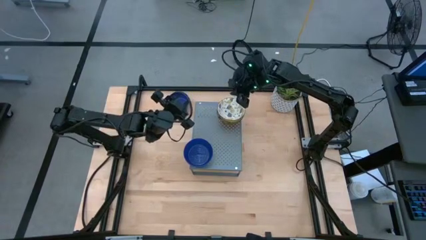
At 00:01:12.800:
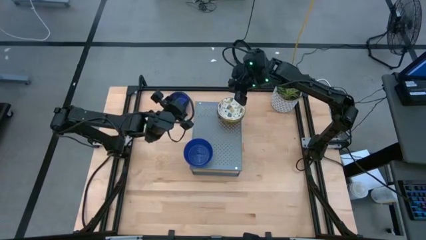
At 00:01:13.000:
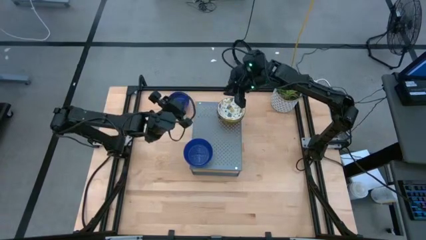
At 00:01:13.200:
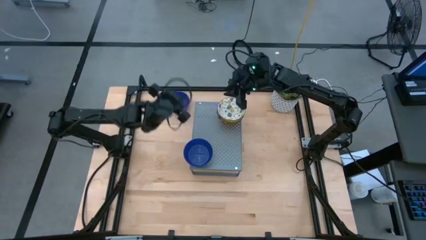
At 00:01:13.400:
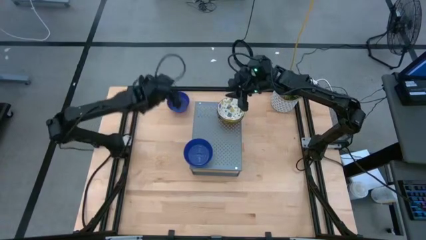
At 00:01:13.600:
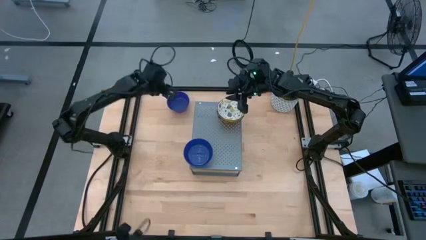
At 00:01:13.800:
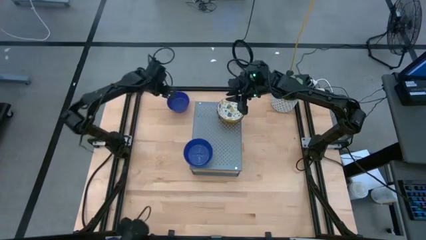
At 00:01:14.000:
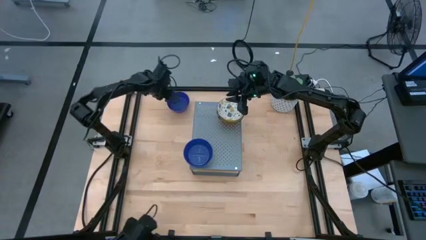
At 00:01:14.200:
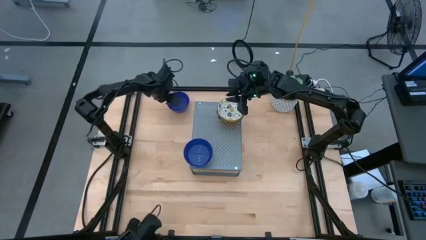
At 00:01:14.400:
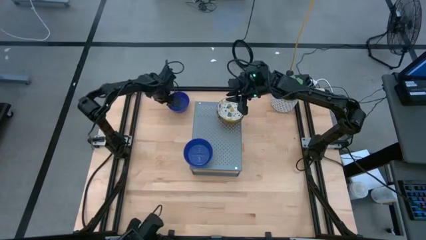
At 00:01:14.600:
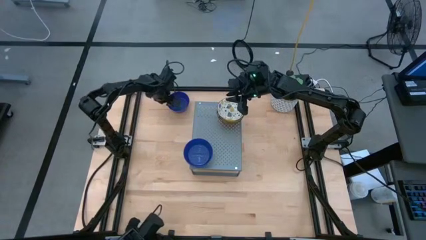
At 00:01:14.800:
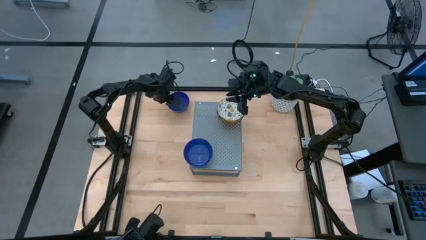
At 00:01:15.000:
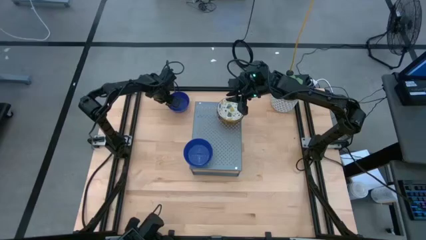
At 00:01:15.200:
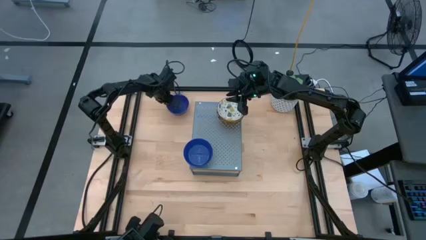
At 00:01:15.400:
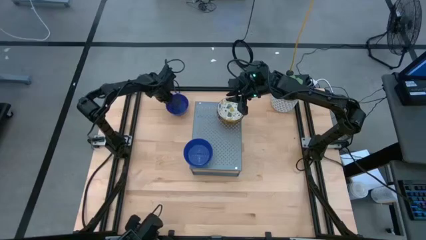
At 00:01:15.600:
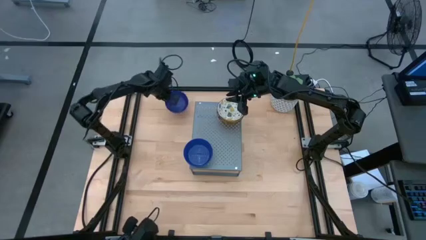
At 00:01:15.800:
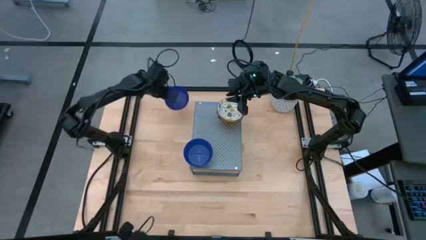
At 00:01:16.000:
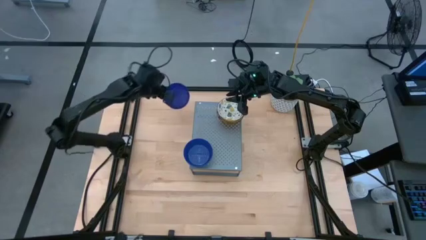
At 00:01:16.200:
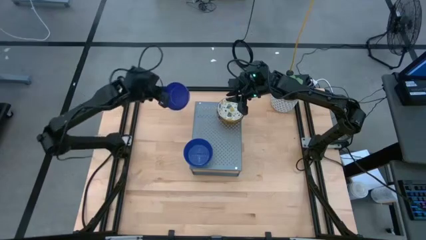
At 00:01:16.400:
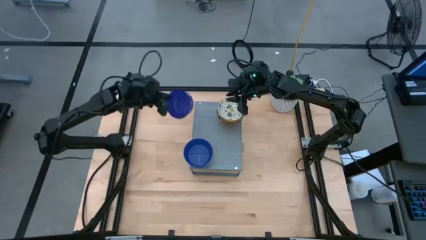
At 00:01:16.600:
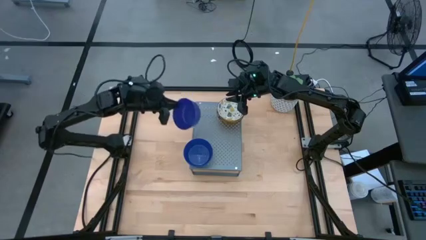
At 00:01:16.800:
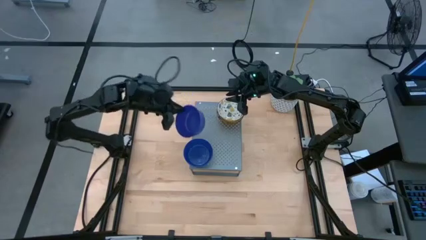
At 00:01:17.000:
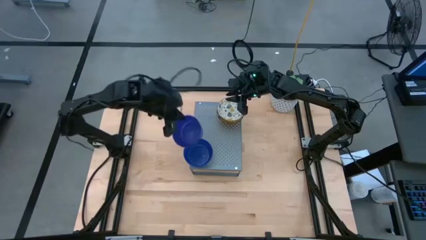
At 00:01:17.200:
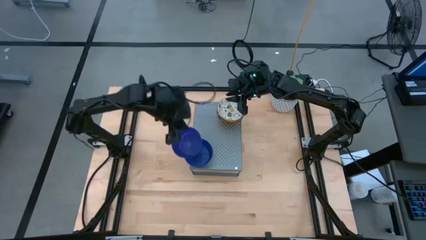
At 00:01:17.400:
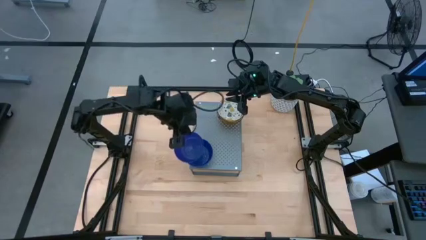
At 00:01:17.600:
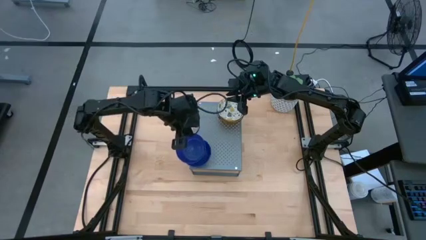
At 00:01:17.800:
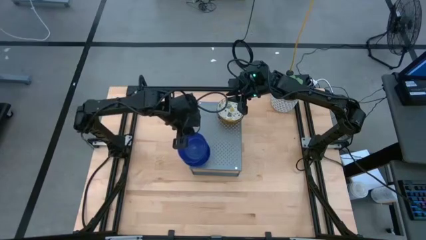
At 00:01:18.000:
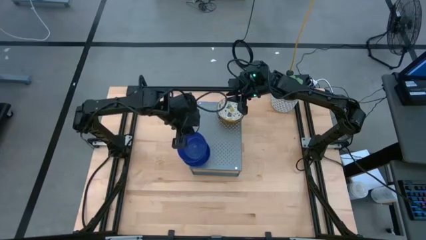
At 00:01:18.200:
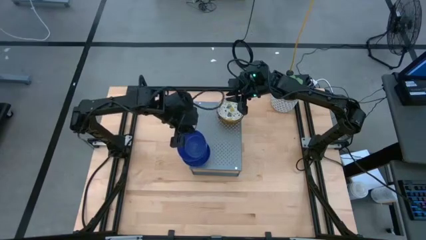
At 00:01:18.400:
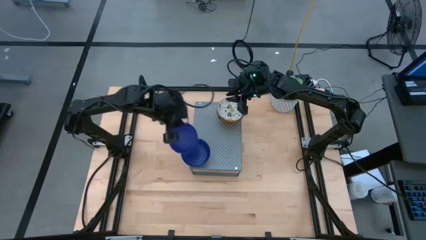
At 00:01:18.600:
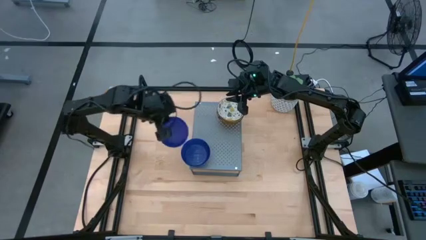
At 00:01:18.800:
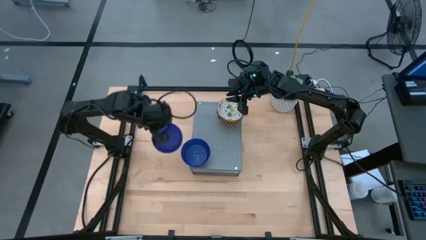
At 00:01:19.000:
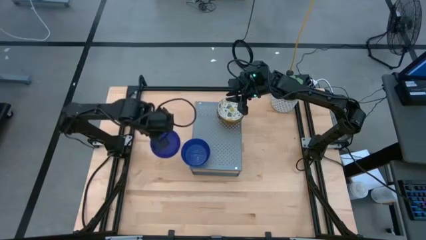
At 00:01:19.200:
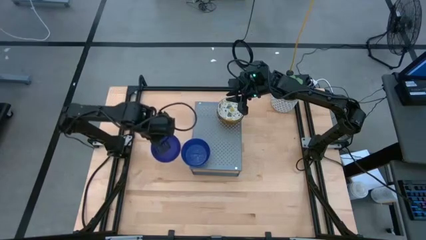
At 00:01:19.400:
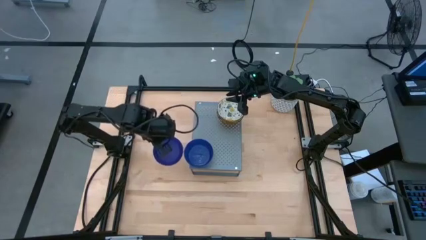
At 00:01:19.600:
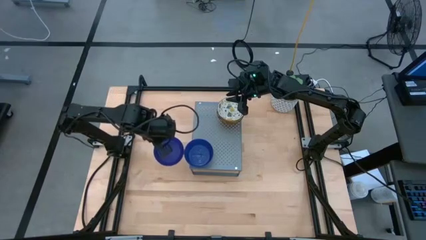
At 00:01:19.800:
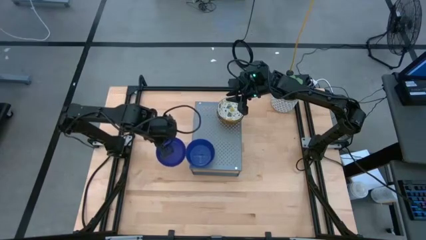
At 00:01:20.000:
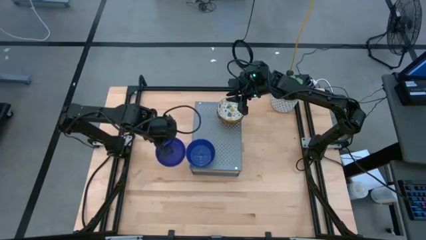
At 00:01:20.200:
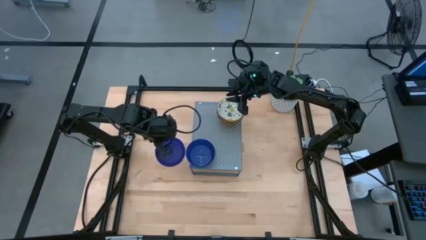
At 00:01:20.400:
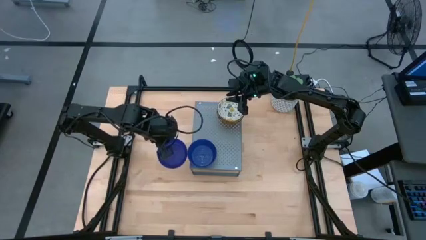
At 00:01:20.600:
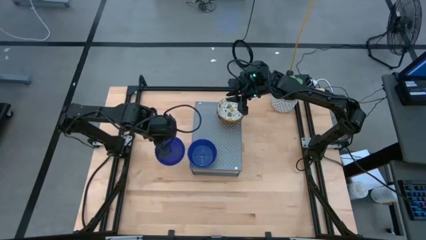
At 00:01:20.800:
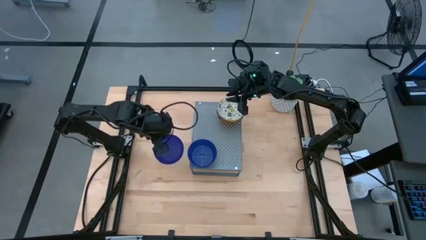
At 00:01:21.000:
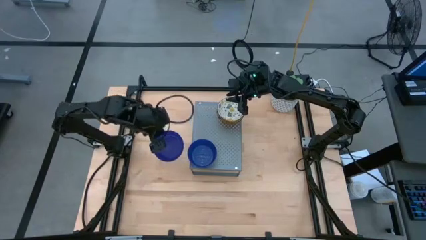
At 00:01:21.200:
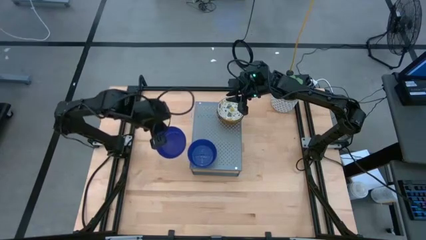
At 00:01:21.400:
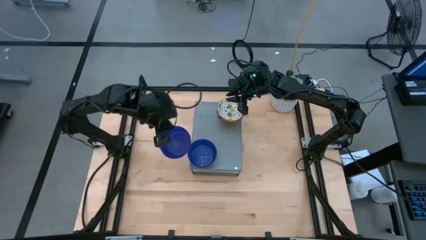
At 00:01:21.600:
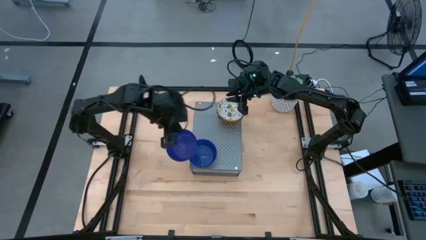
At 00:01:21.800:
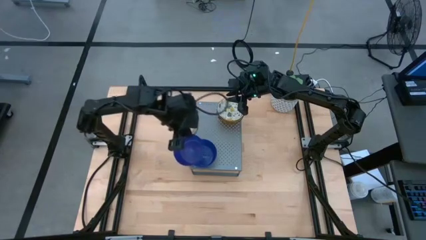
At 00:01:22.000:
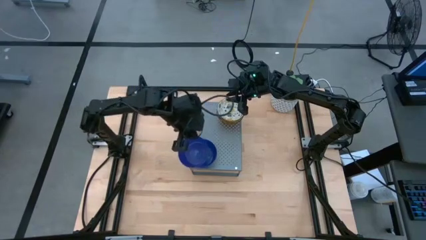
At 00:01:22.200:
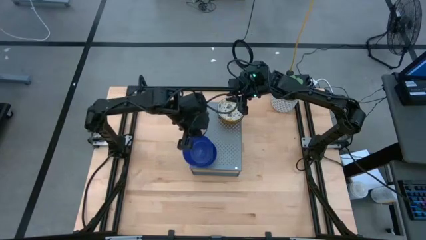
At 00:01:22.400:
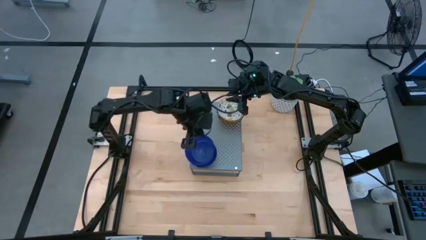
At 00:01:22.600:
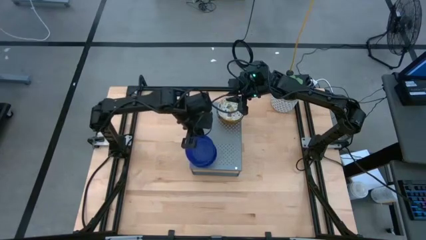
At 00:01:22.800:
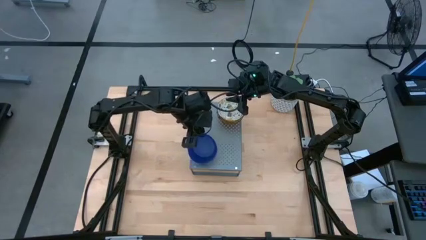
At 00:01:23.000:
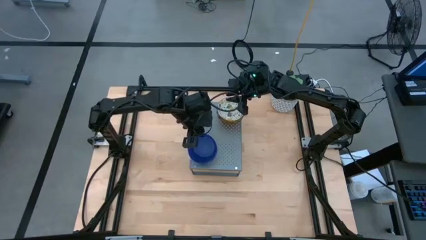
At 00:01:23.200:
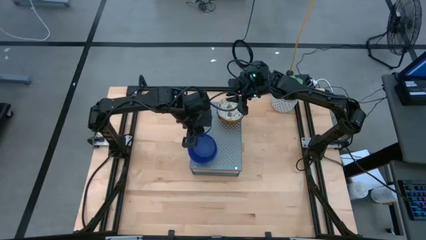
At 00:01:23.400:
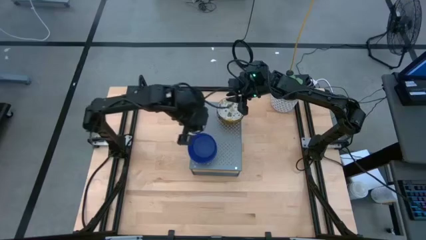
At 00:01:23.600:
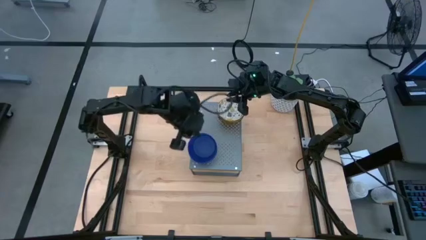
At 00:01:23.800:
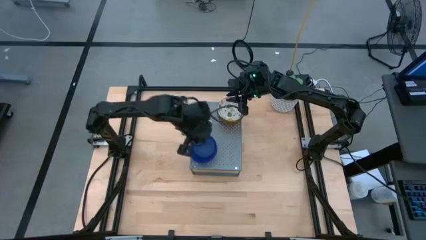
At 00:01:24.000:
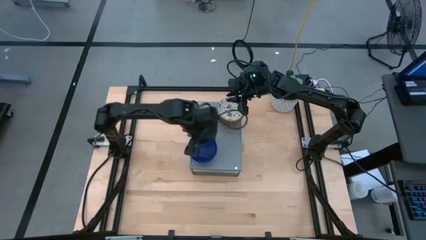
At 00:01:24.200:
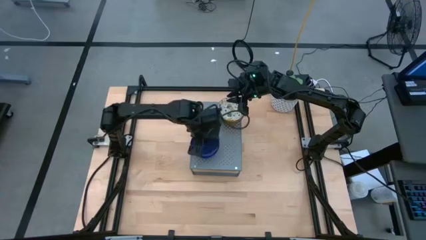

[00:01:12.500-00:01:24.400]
Task: Pick & Place Mini bowls
Stack the blue bowl on top of the blue bowl on the shelf

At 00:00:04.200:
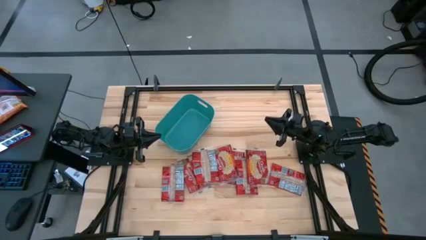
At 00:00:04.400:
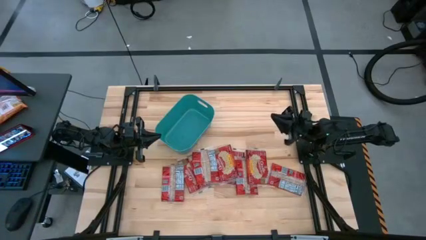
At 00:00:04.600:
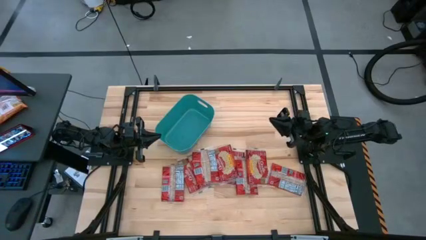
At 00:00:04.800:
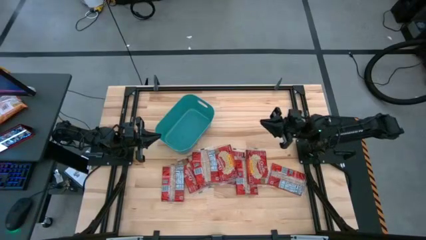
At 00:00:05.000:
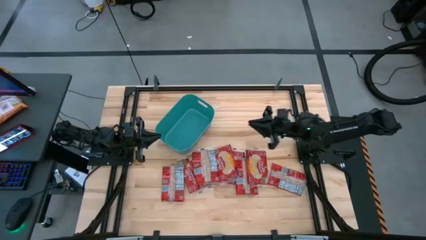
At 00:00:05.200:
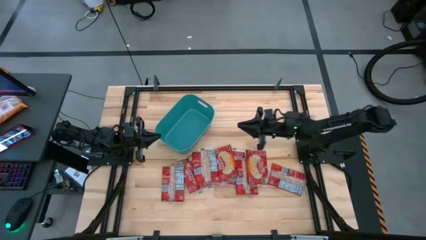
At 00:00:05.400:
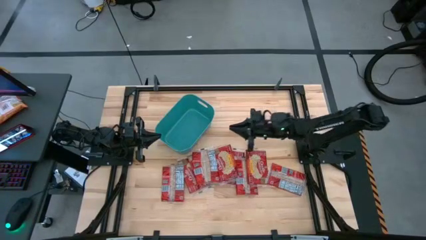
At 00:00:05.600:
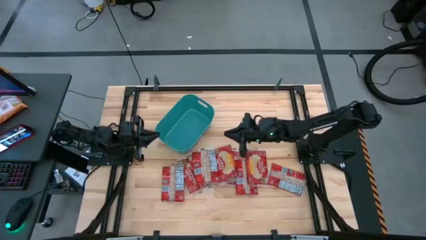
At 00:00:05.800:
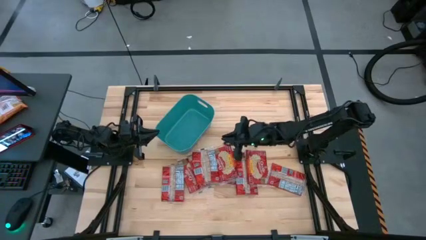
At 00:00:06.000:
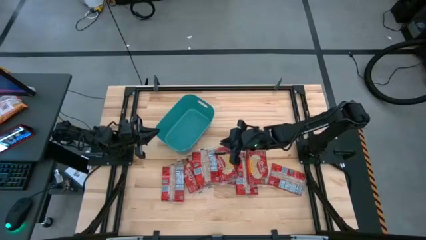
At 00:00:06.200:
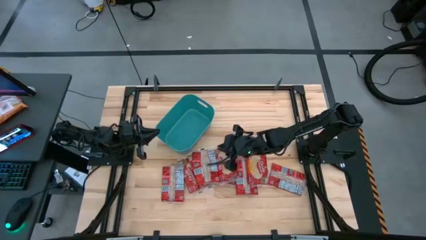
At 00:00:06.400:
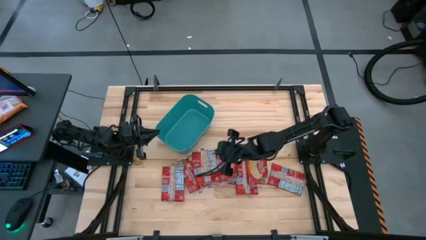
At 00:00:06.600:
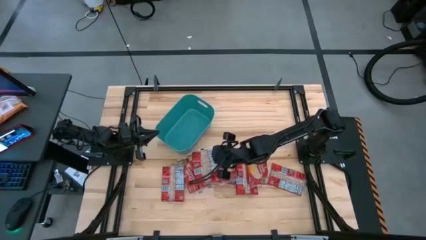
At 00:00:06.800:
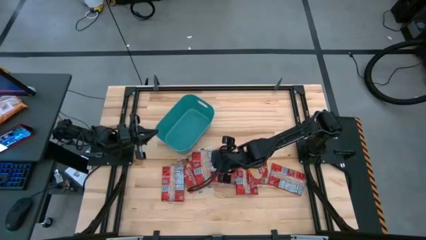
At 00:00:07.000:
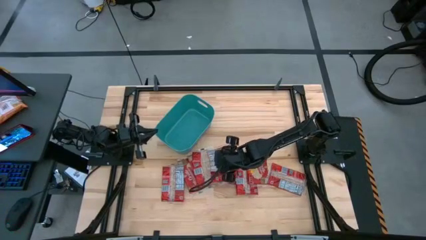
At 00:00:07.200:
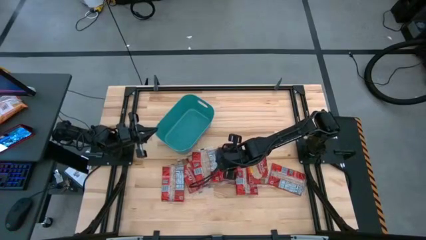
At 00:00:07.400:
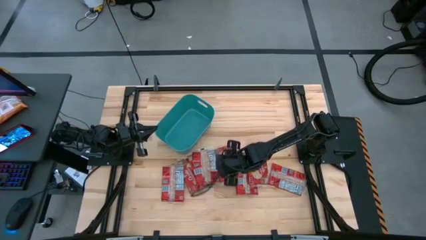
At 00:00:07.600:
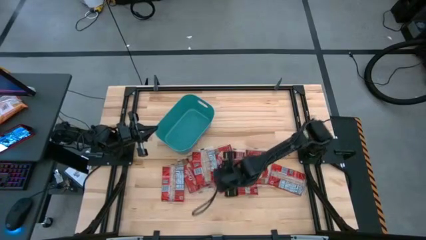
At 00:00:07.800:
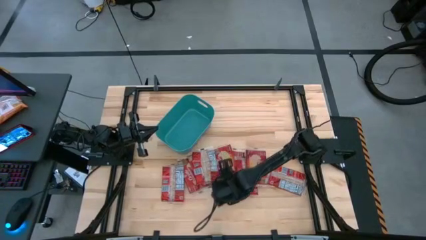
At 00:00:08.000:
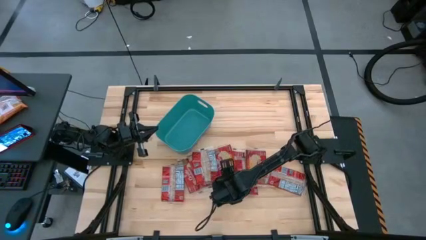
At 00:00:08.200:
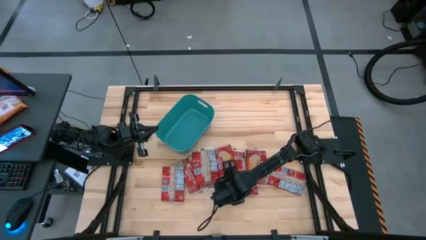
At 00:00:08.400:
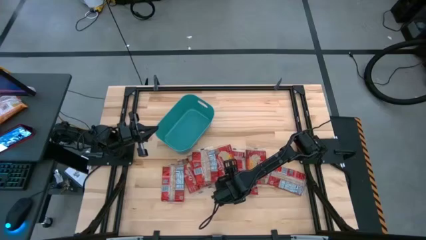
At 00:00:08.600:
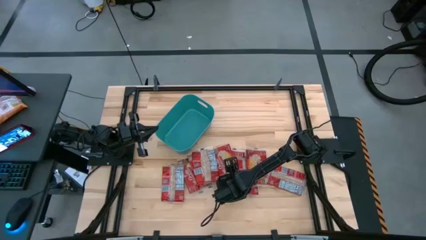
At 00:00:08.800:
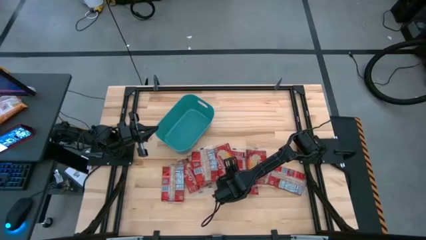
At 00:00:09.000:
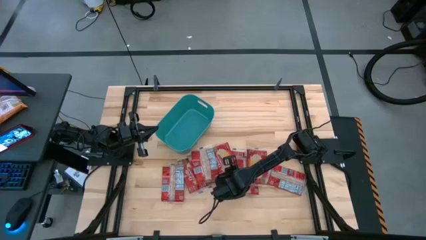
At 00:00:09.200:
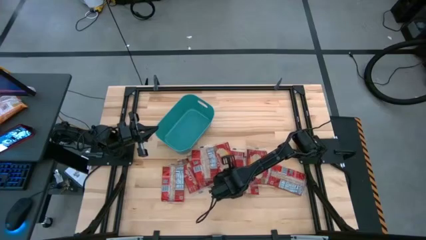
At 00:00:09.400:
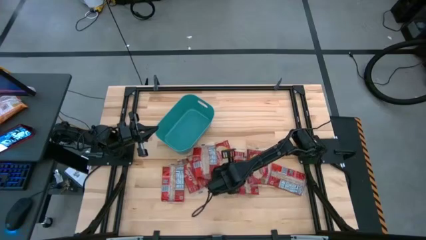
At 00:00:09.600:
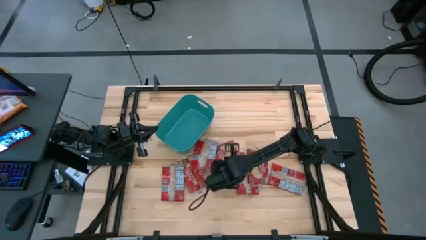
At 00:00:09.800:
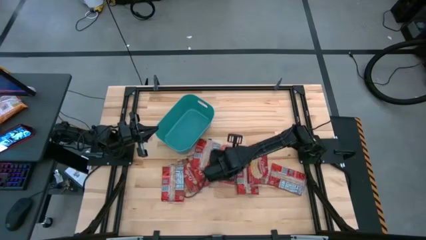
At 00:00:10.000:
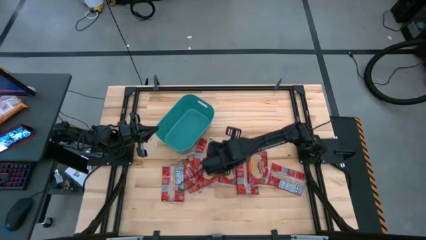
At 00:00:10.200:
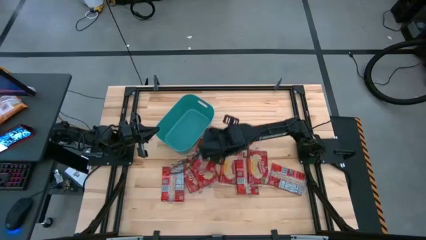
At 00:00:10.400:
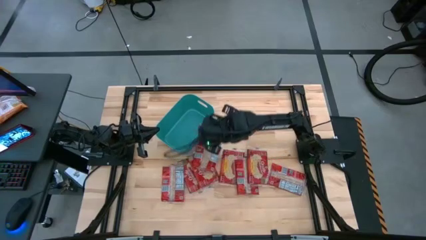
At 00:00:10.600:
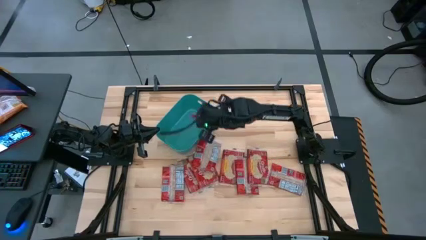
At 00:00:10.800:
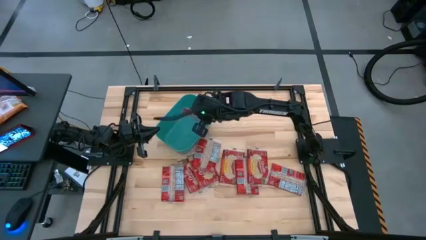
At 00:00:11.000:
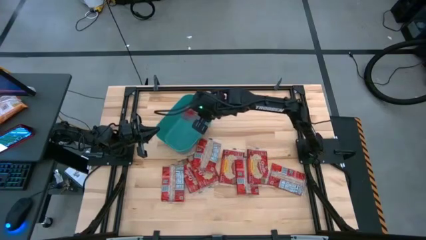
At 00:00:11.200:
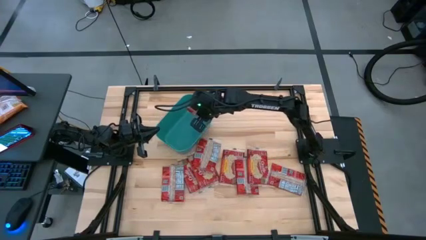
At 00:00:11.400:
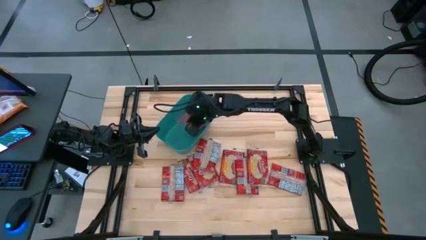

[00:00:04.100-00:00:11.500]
Task: Sort popcorn bags into baskets
Put the red popcorn bag into the blue bin
